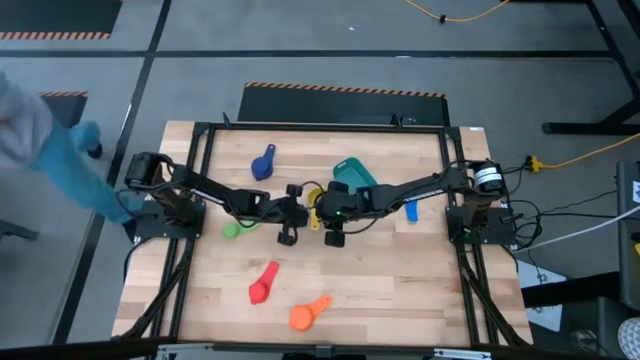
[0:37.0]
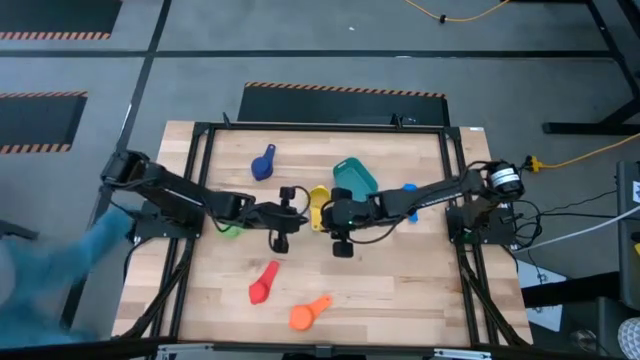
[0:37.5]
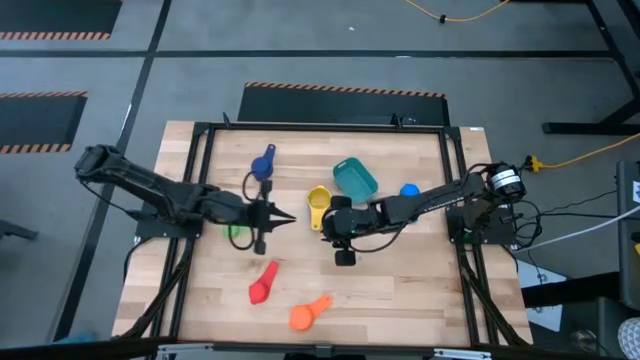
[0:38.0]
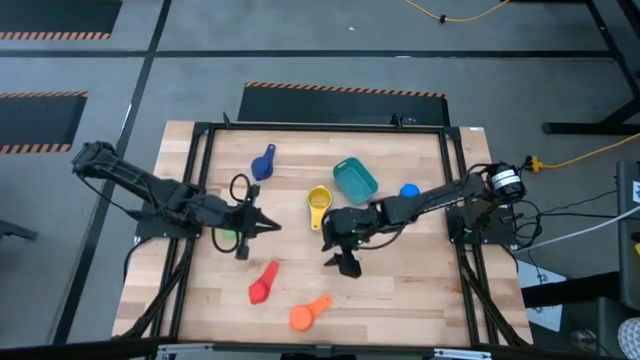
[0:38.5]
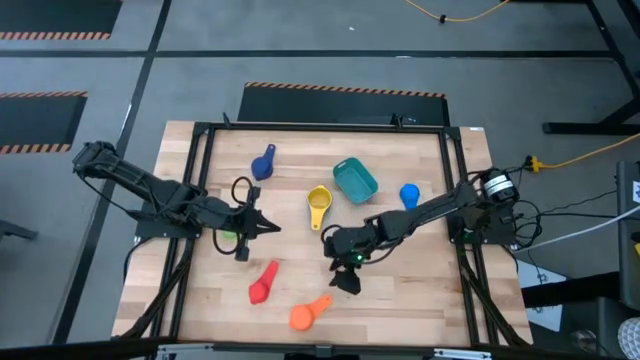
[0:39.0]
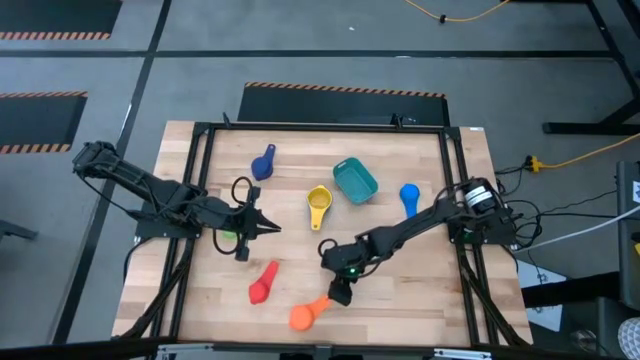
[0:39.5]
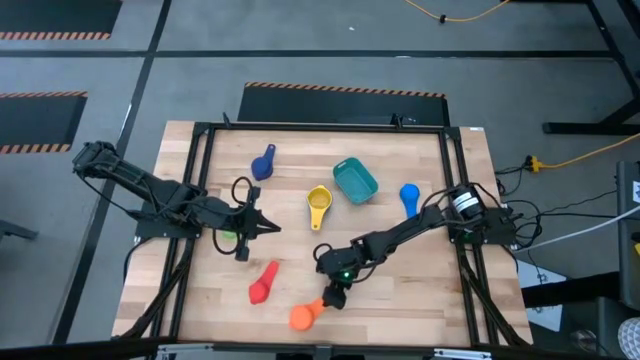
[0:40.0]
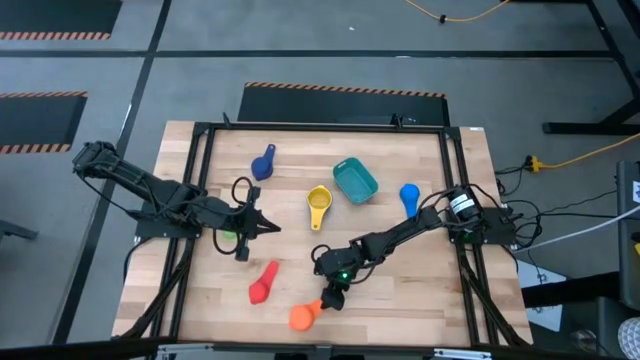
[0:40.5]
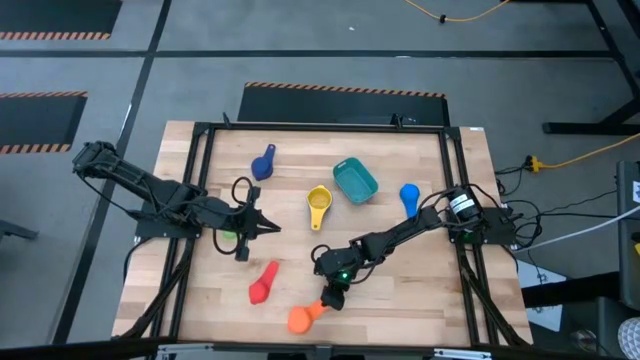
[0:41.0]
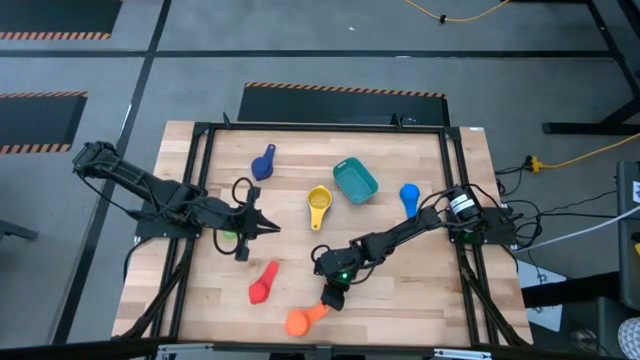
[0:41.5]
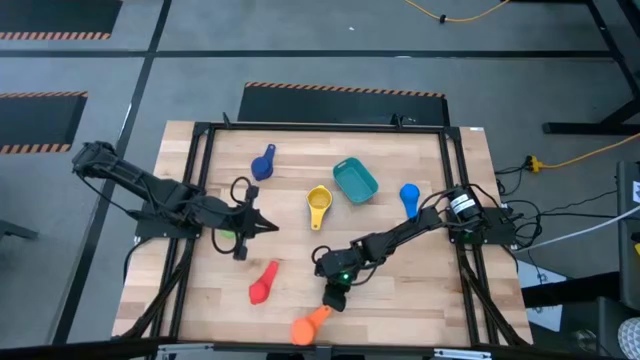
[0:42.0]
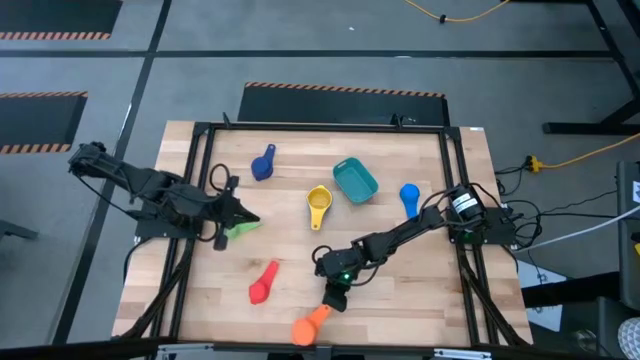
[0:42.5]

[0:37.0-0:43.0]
Task: Nest measuring cups in basket
Move the orange measuring cup to the right of the green measuring cup
